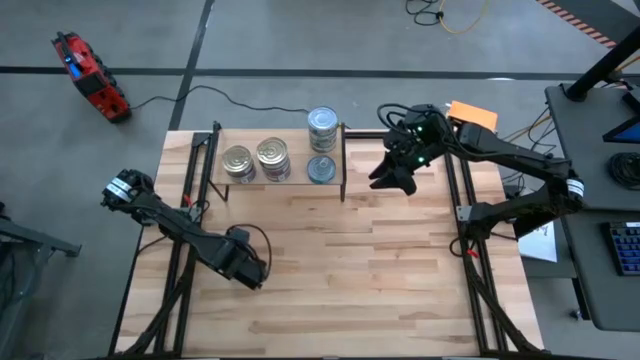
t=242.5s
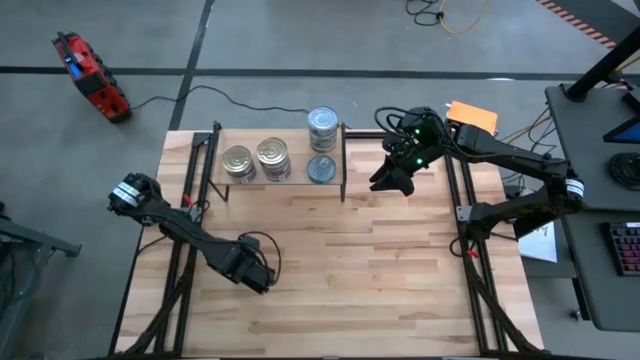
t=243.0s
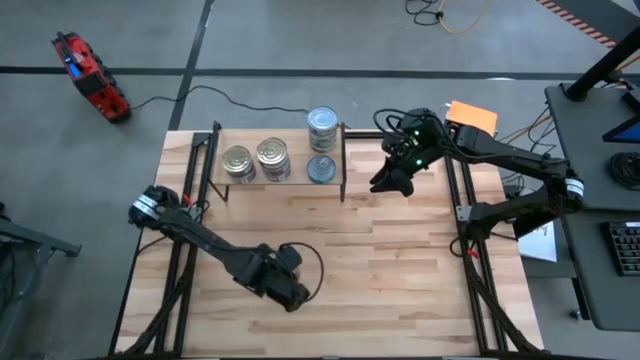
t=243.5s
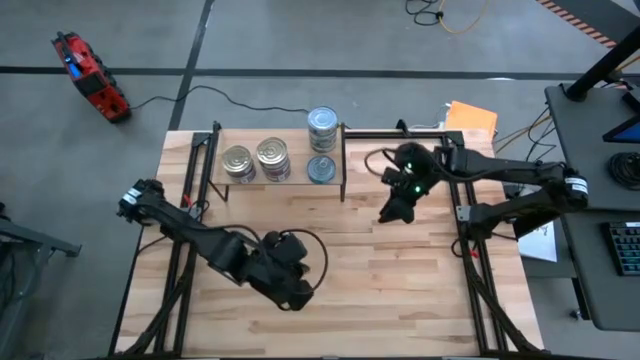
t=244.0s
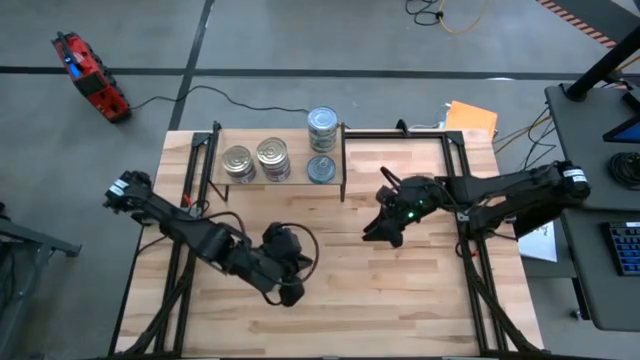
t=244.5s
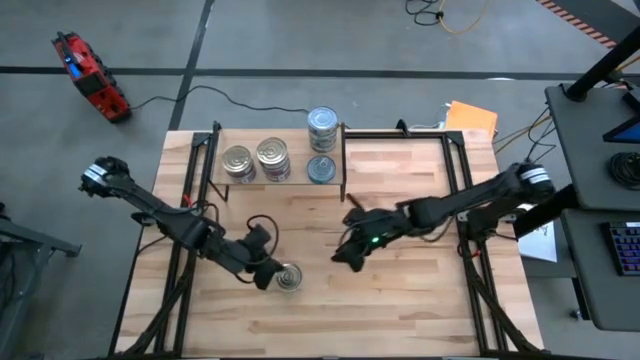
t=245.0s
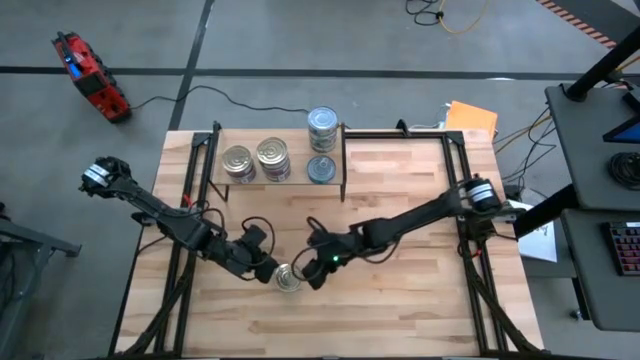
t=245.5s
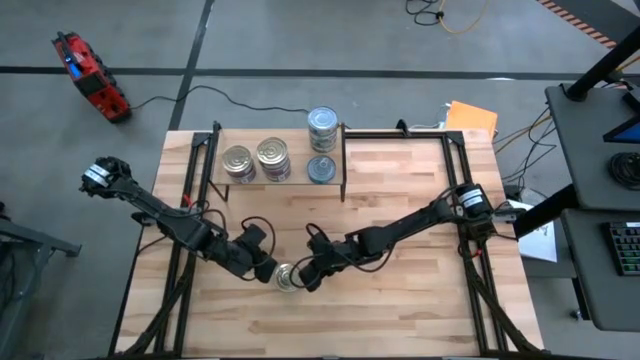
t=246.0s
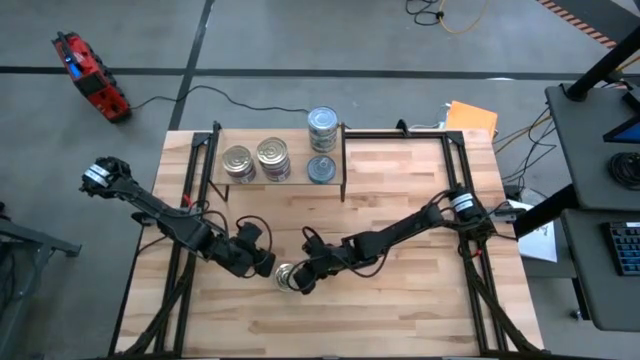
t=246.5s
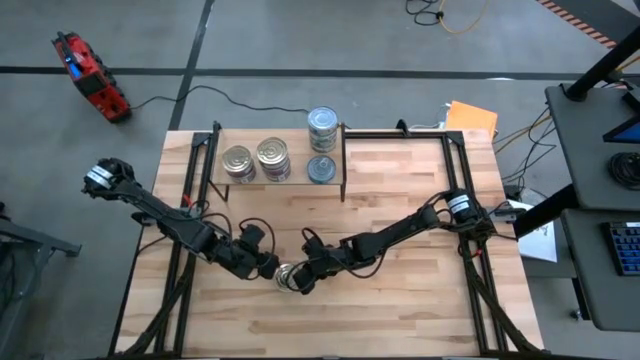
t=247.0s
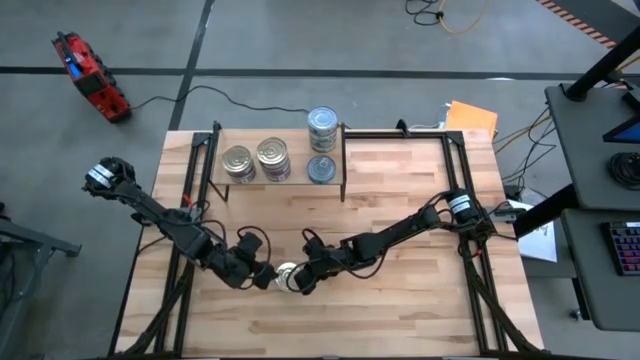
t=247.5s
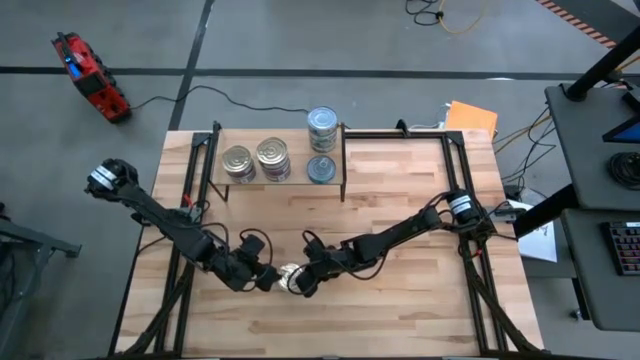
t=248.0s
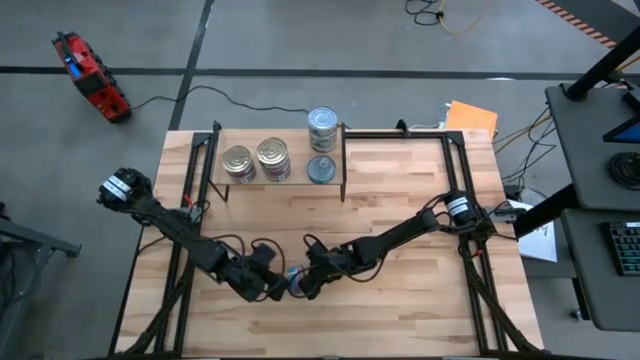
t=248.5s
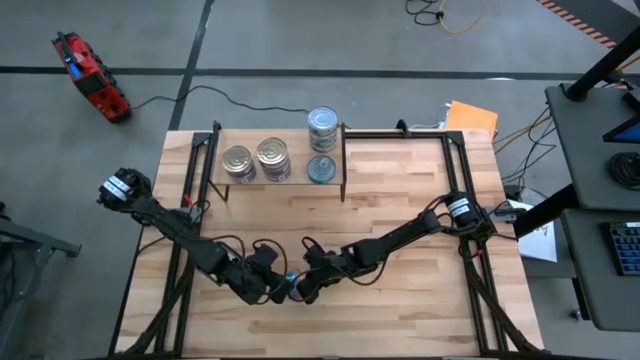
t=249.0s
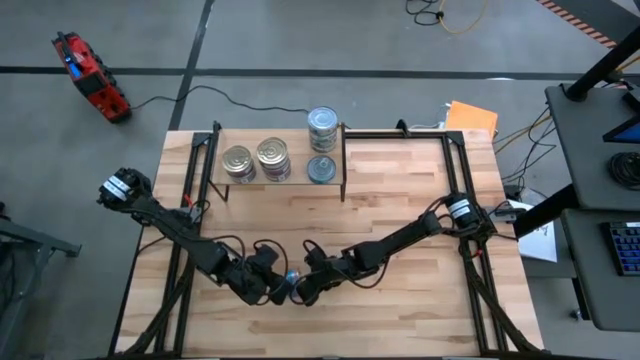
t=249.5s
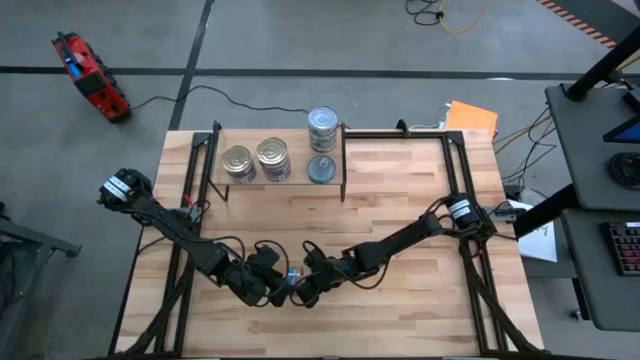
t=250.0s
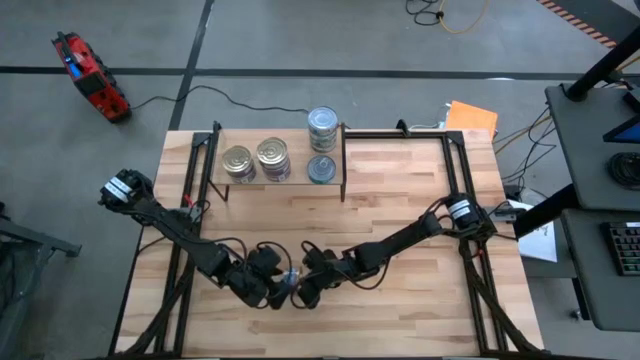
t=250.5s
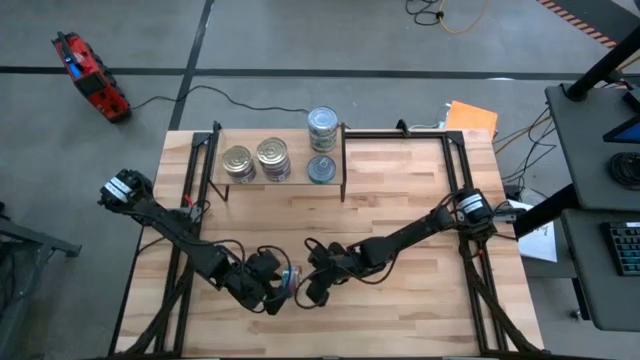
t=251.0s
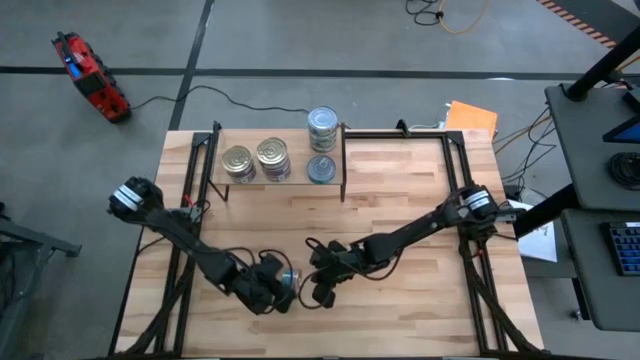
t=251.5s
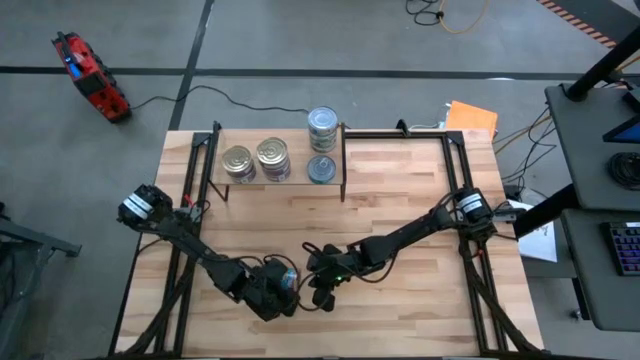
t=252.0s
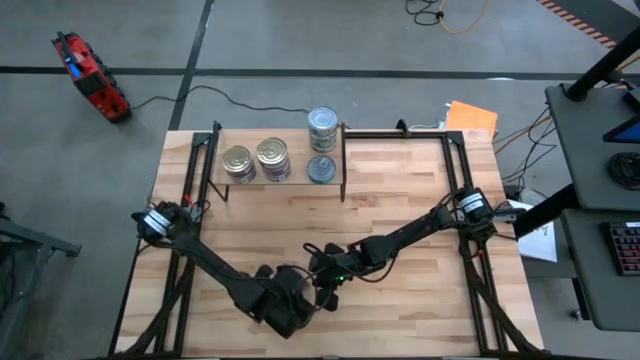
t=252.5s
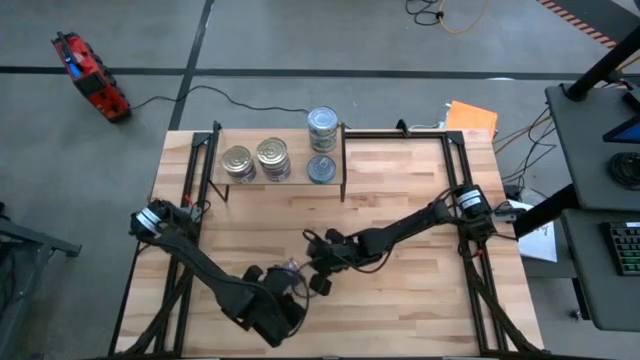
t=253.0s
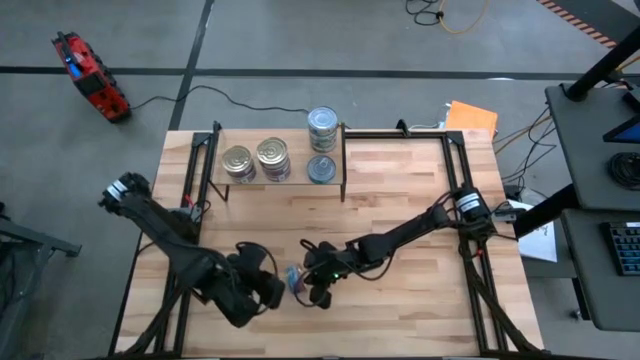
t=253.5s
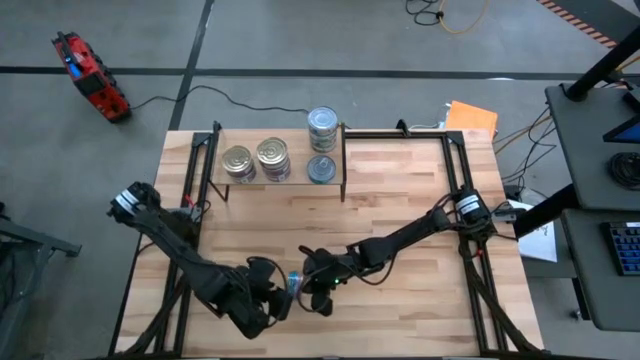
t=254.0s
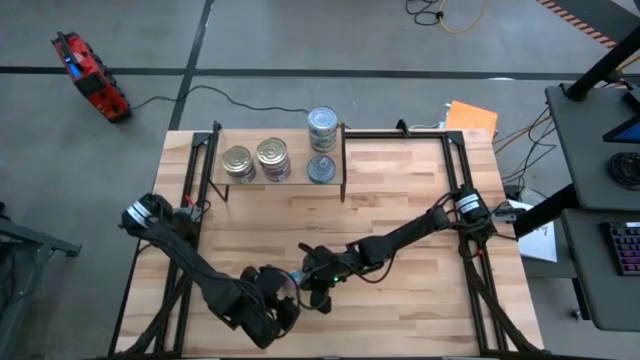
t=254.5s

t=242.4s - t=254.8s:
Task: Stack canned seafood by type on shelf
Stack the blue and pink tuna can on top of the blue and pink tuna can on the shelf

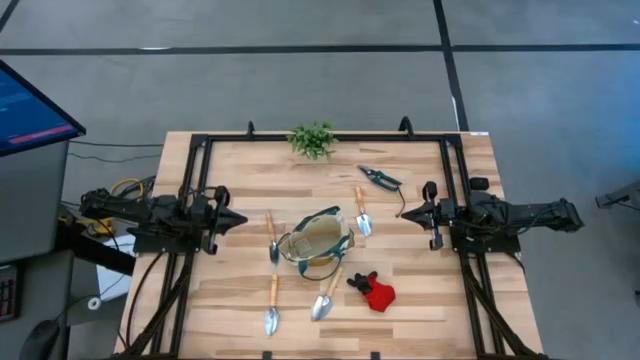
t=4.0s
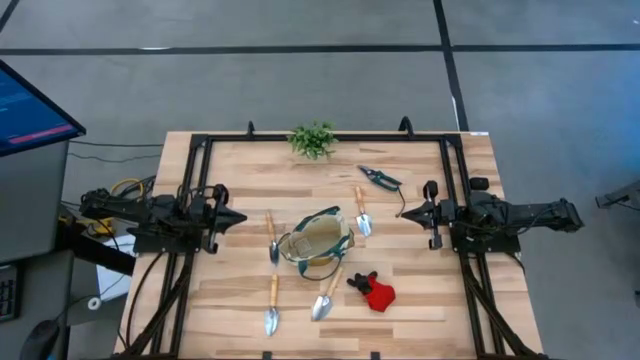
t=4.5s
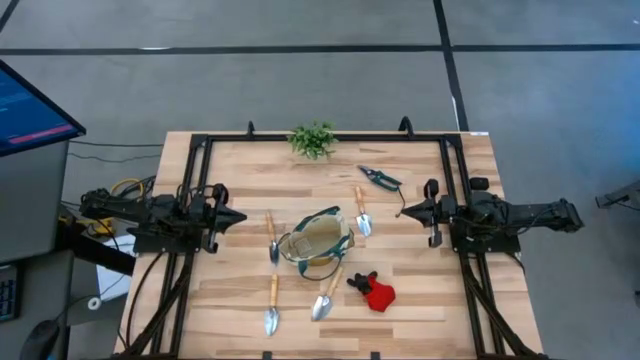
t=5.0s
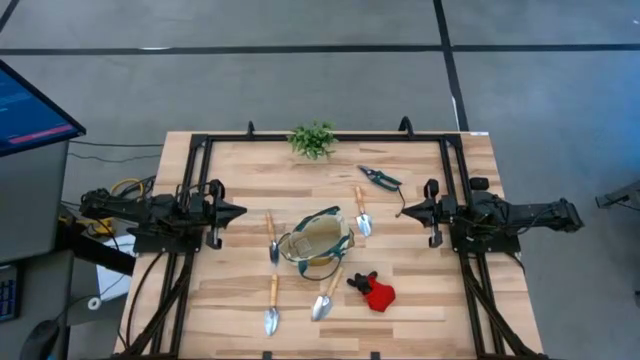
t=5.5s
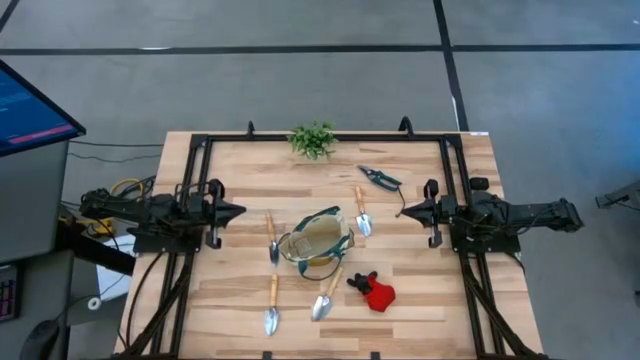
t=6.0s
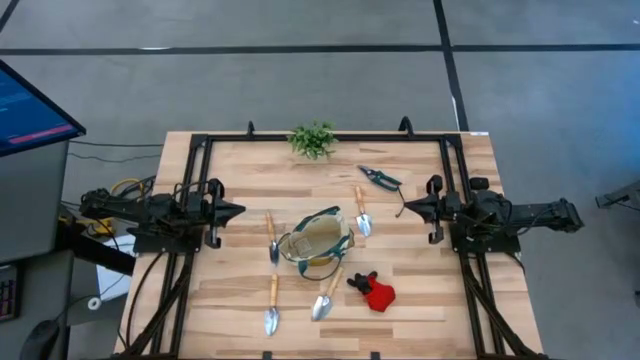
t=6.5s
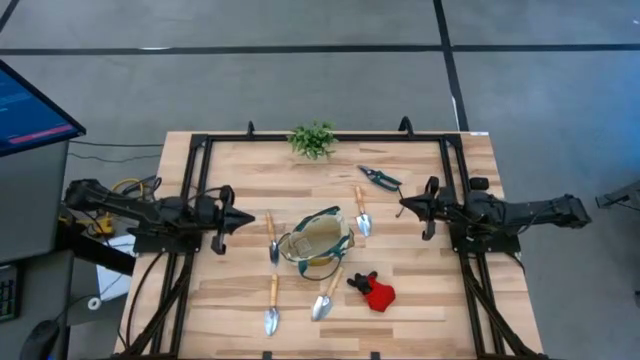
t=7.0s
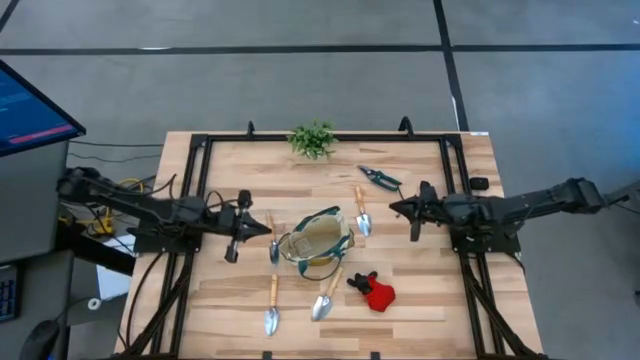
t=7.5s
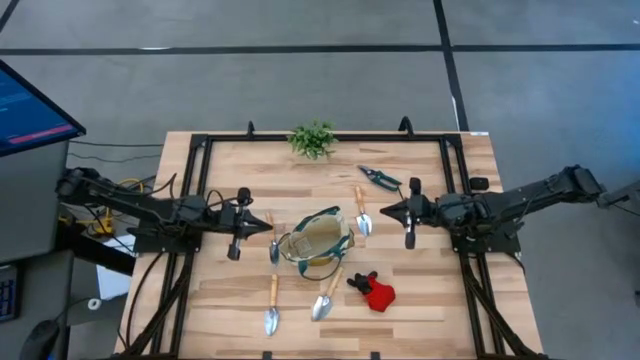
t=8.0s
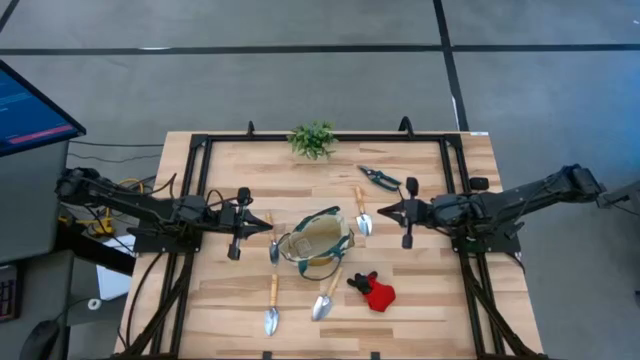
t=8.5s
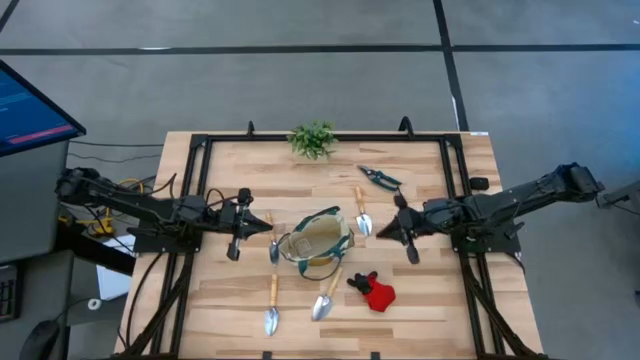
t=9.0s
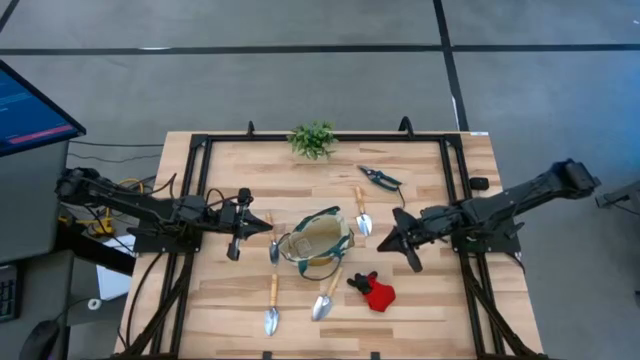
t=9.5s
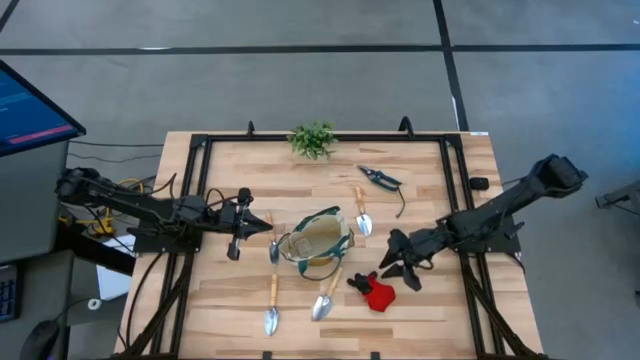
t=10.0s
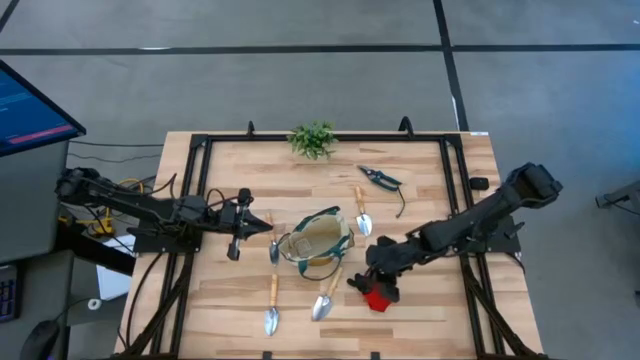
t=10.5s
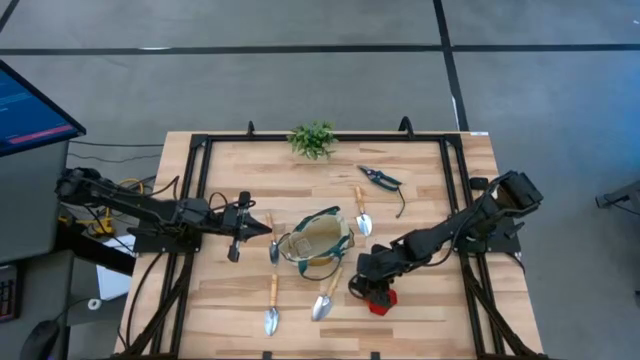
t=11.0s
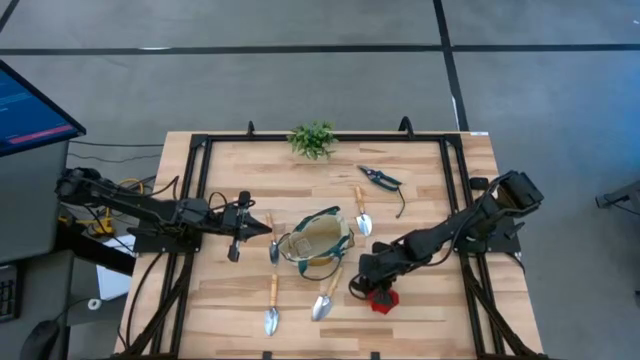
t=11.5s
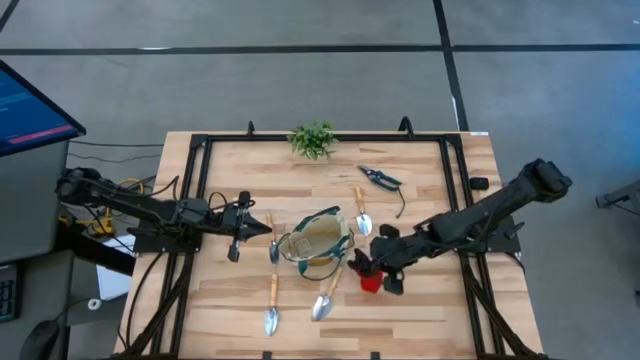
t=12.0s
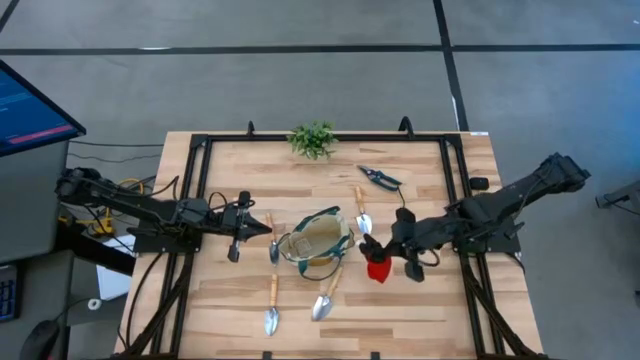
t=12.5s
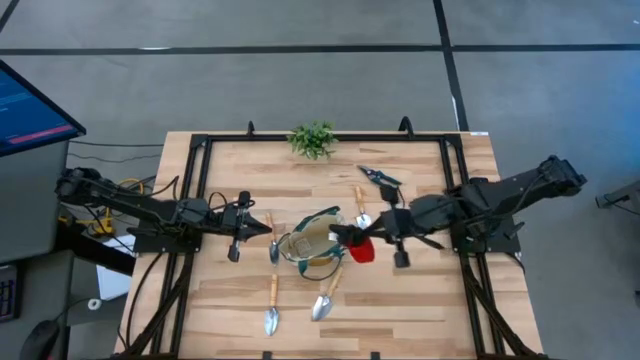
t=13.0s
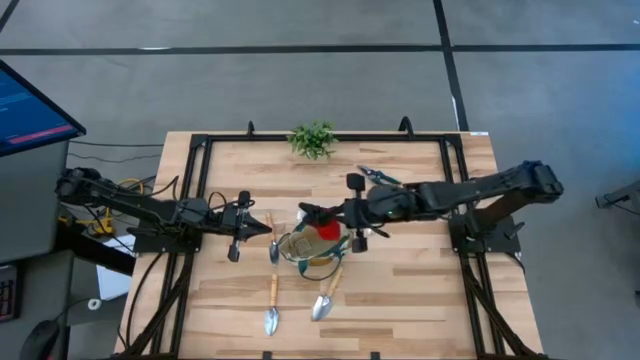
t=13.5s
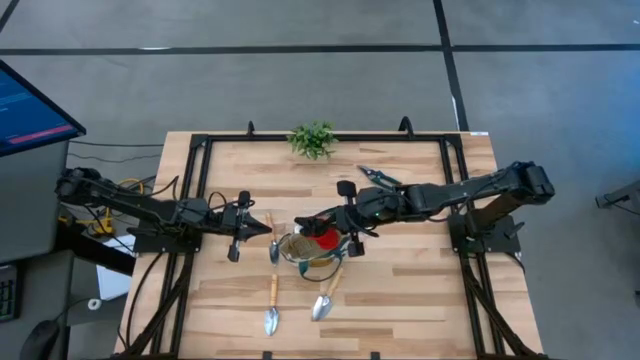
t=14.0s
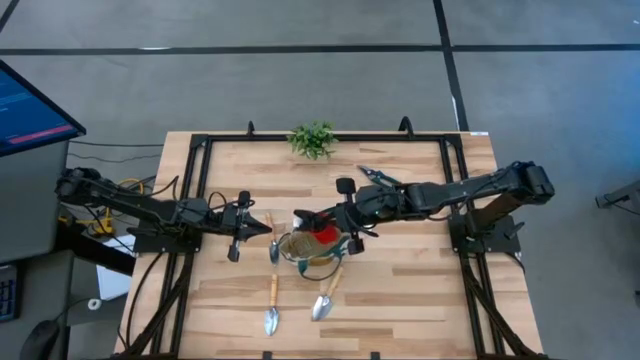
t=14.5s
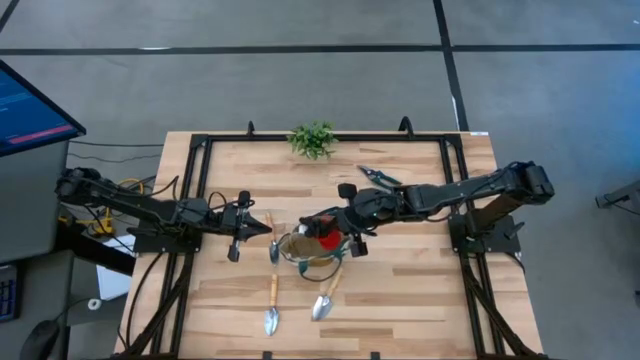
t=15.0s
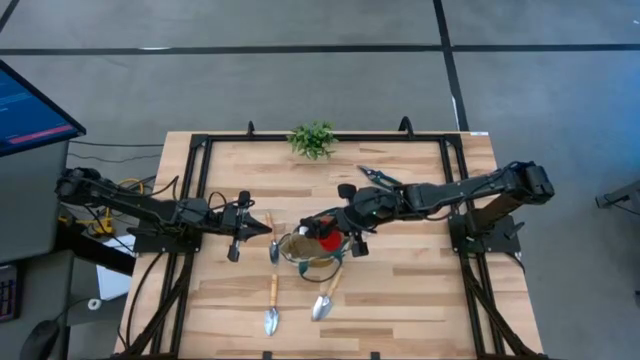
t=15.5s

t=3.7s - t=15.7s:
Task: Pick & Place Garden tools in Gardening bag
Put the gloves into the gardening bag
